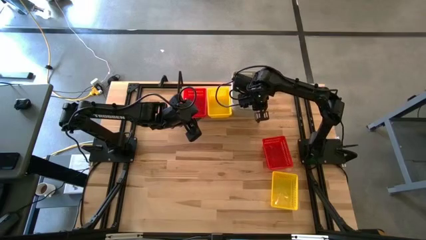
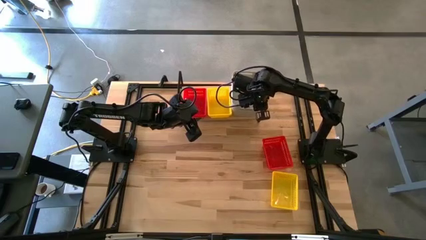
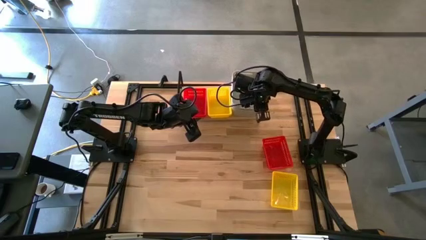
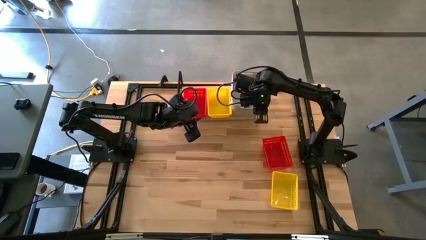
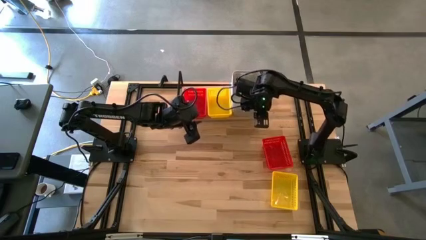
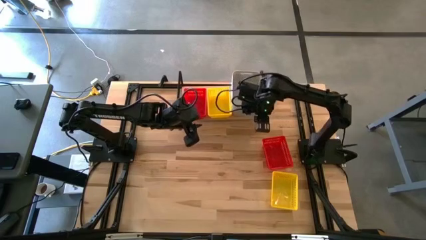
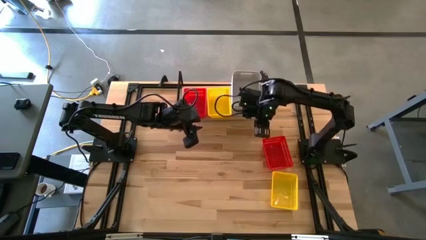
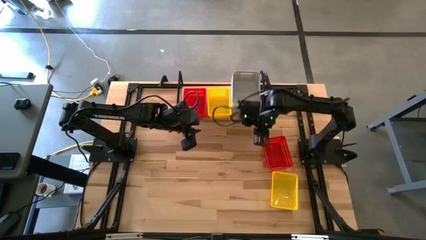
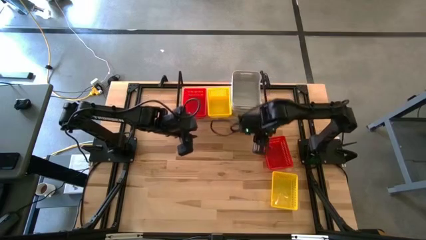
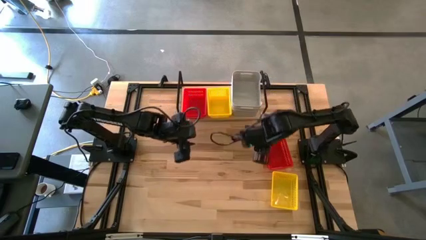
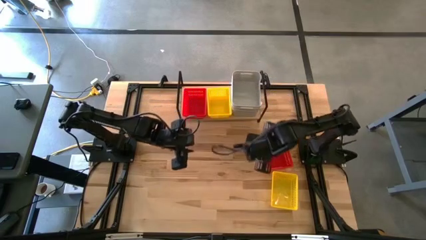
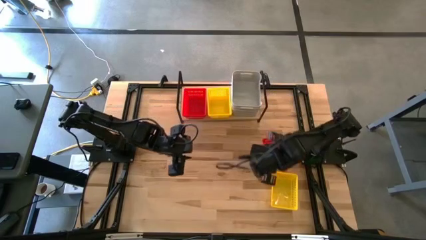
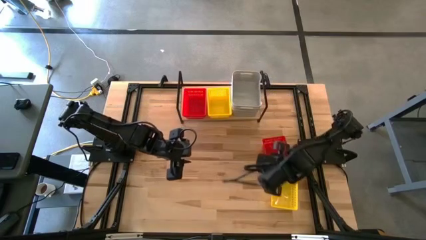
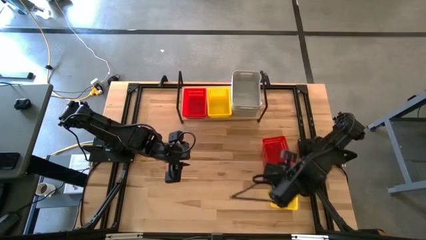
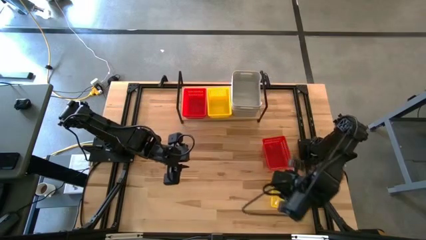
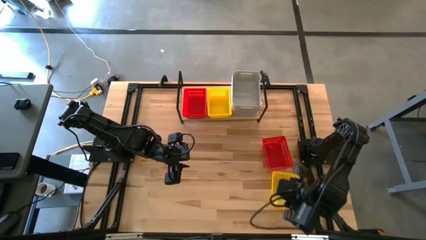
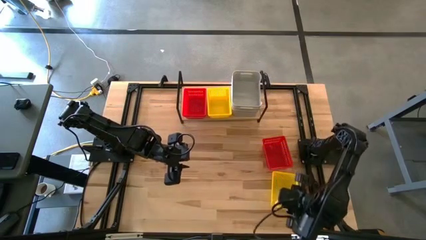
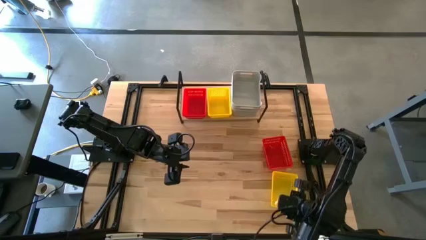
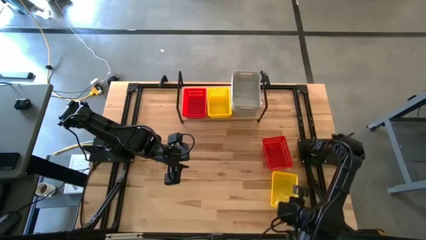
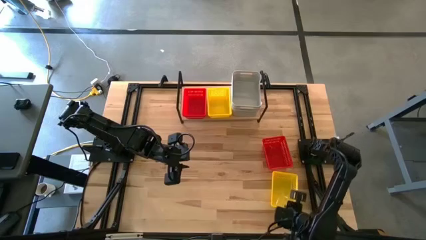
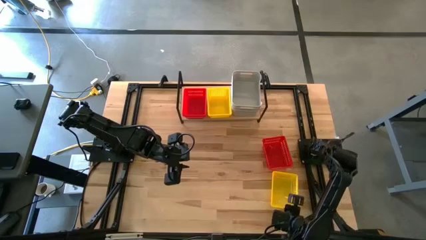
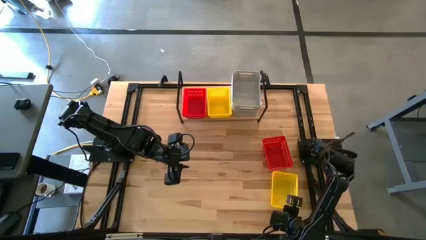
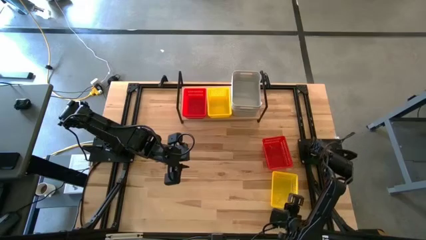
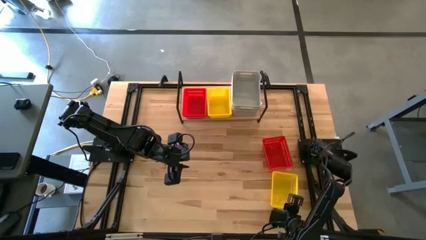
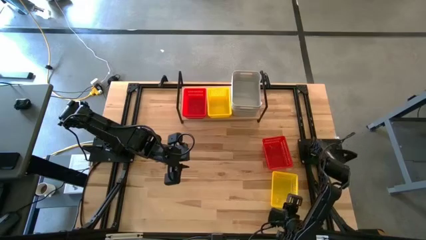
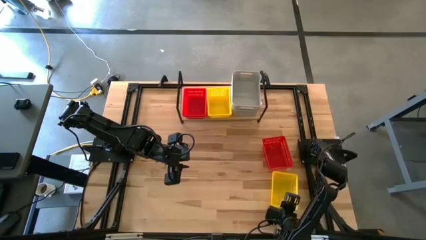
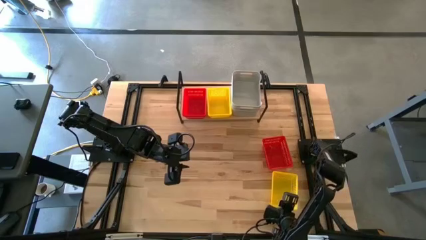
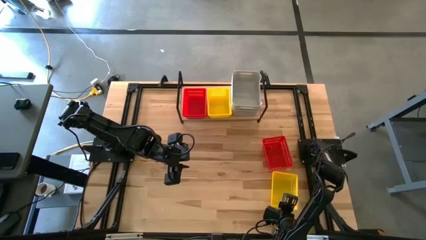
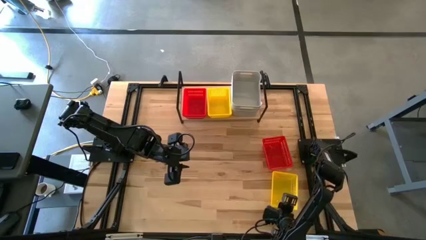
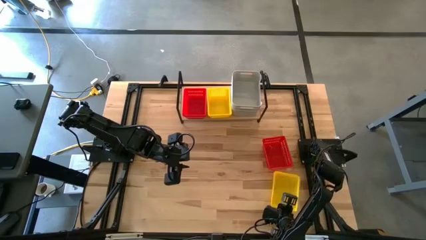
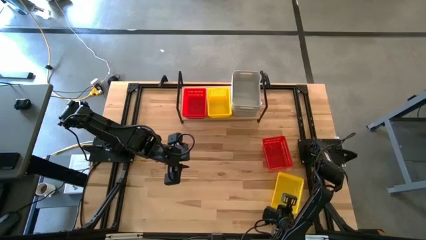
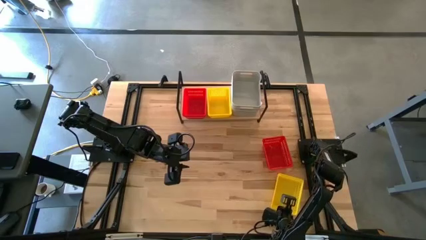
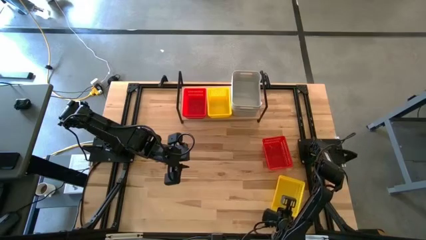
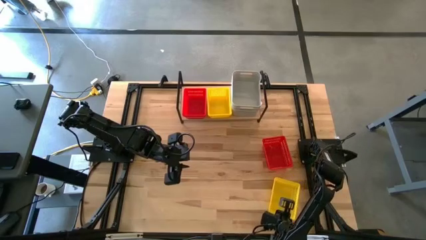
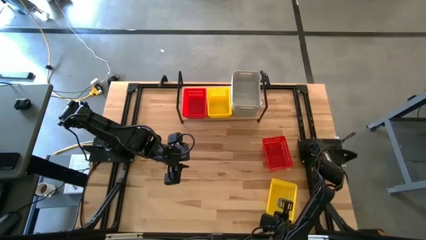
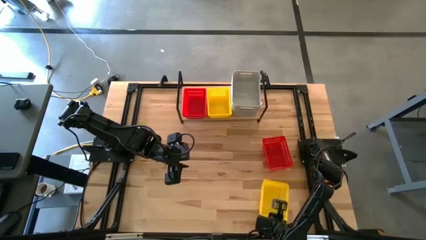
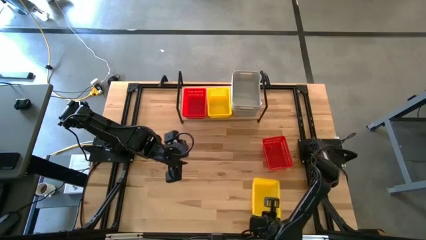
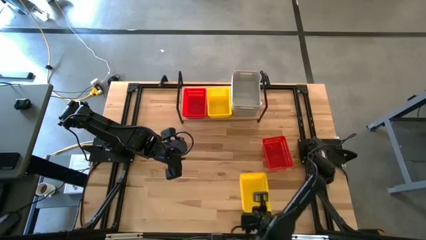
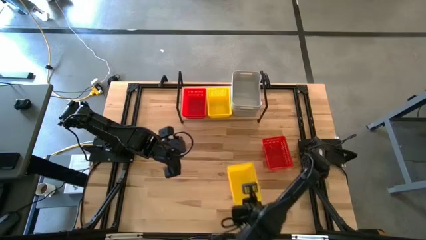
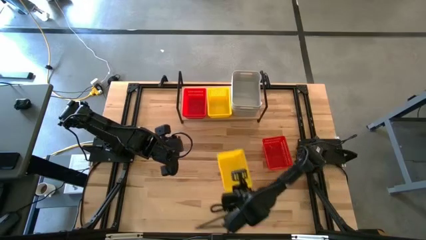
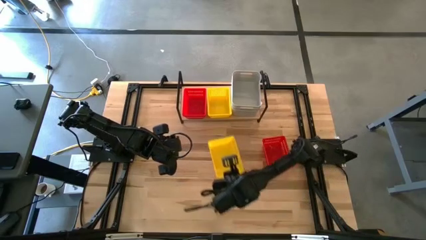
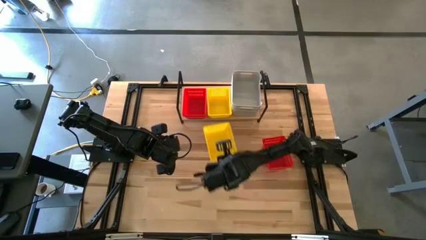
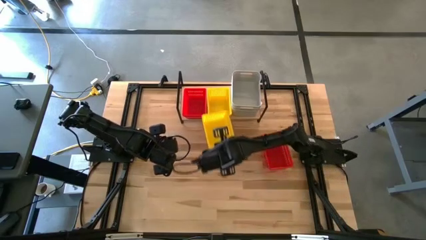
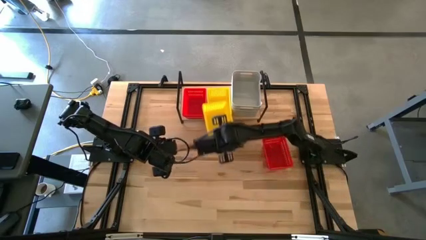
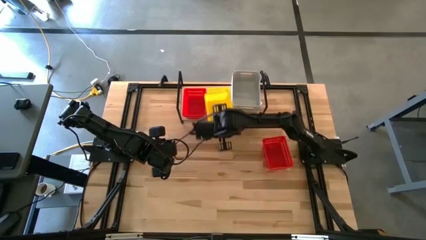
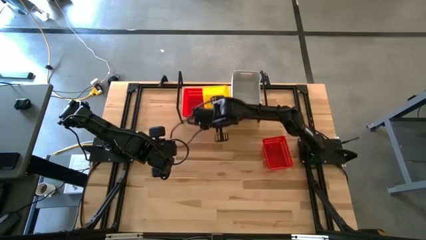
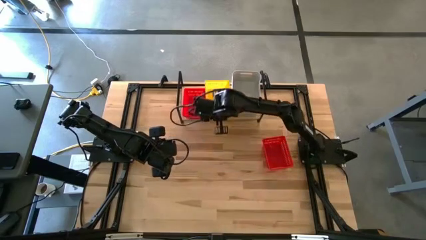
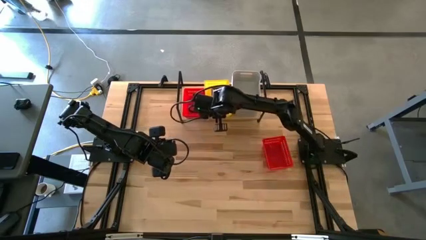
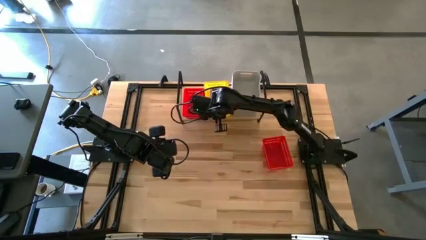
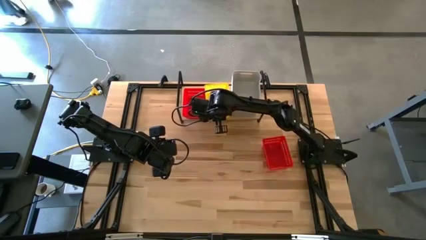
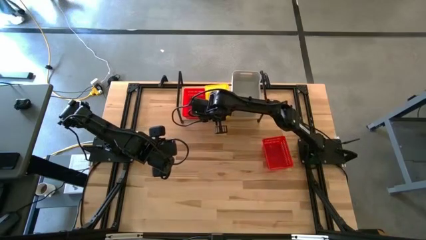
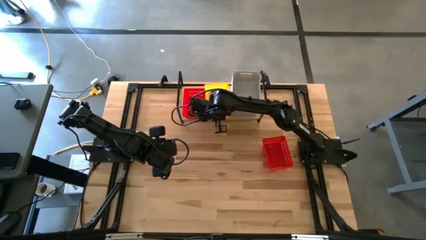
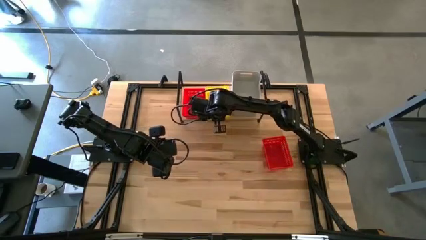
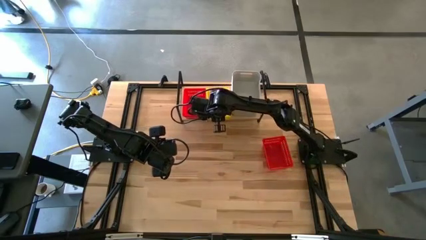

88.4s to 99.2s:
Task: Stack baskets on shelf by color
Stack the yellow bin on the yellow bins on the shelf

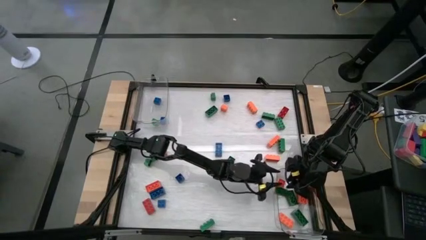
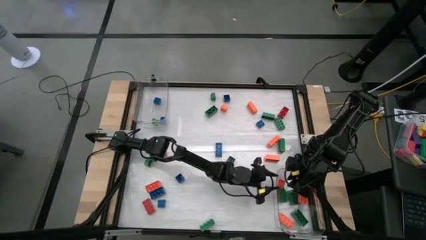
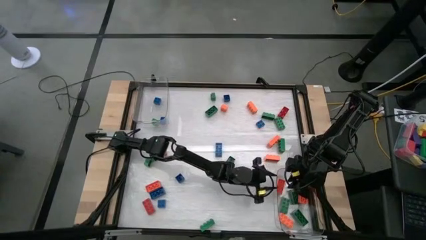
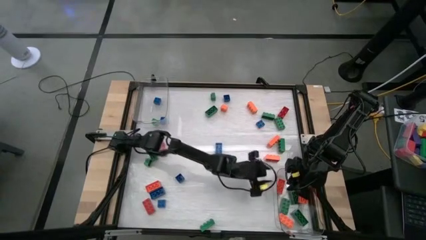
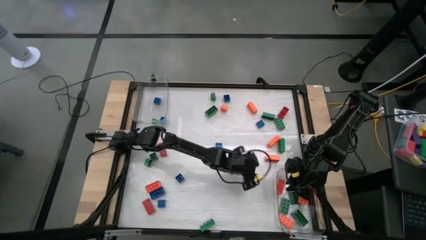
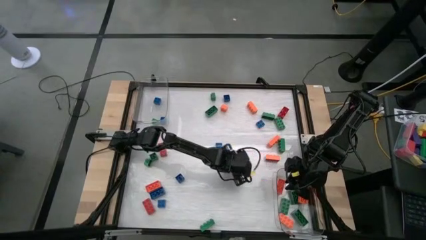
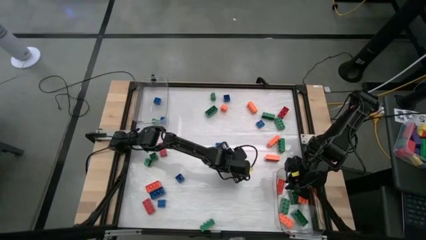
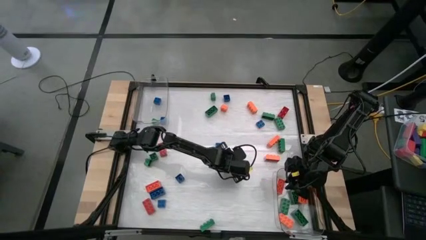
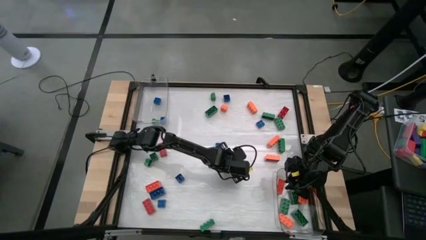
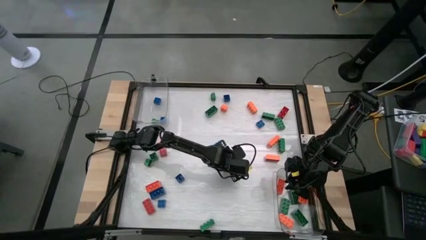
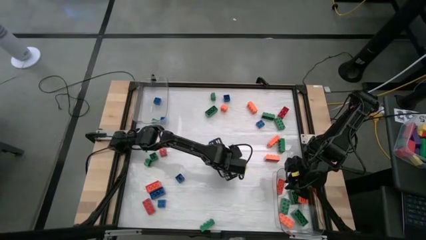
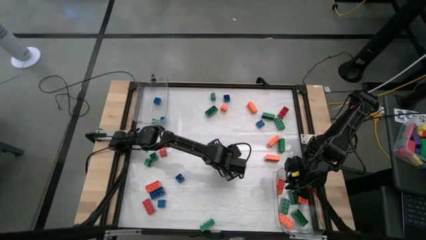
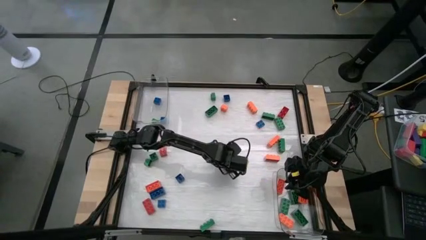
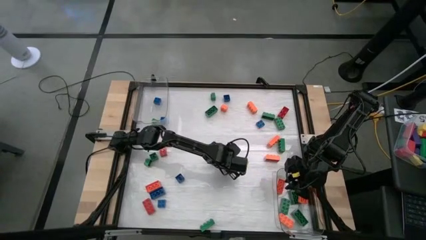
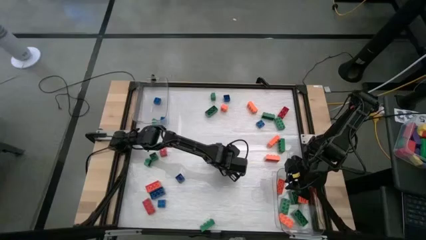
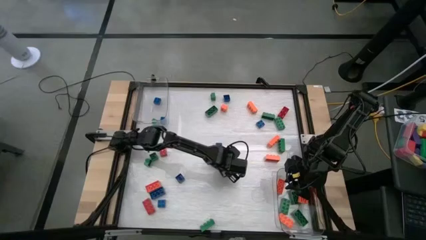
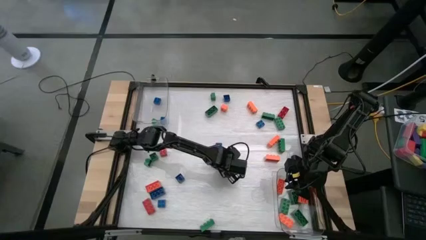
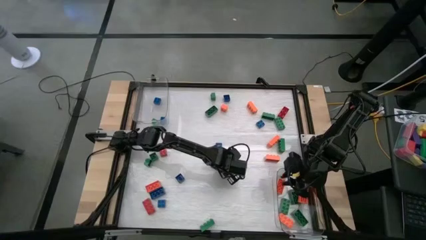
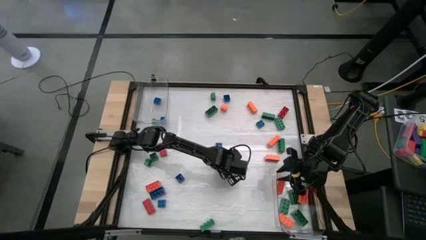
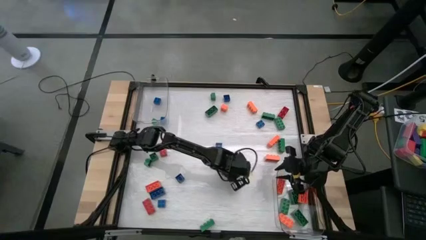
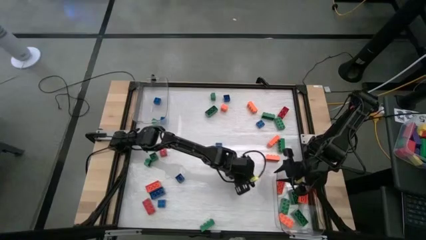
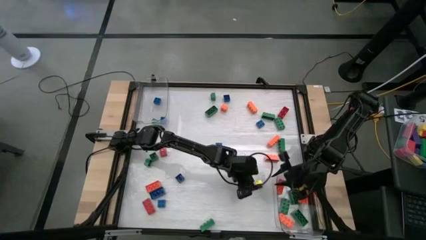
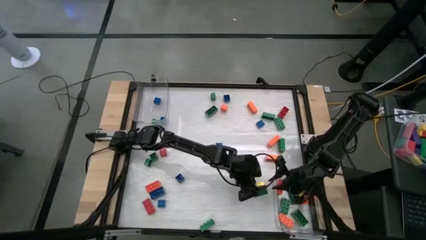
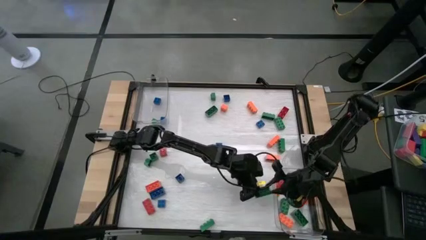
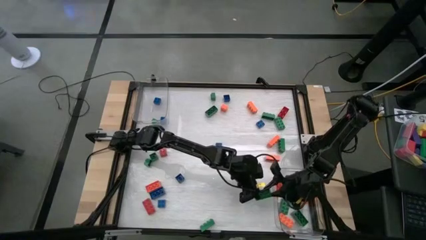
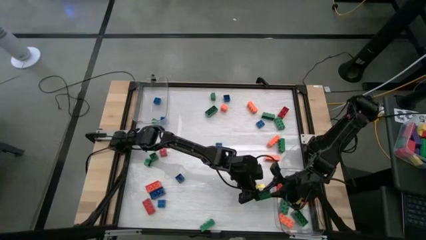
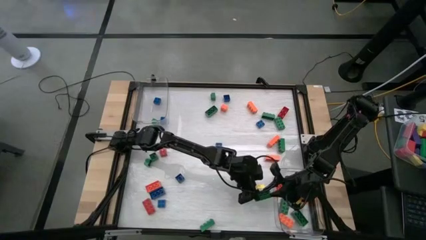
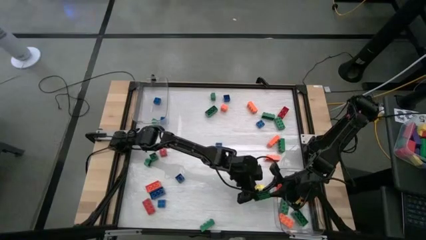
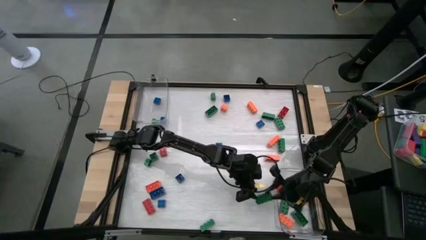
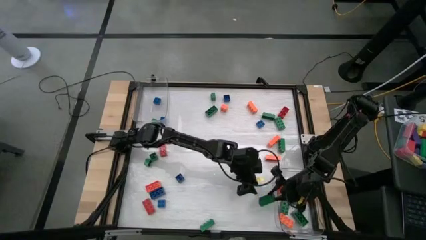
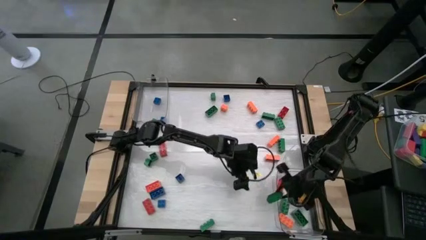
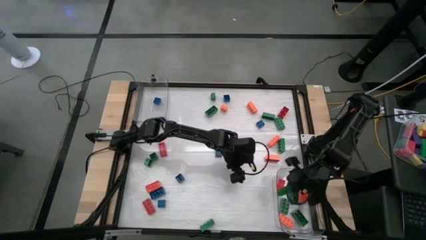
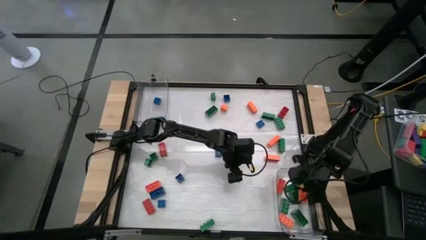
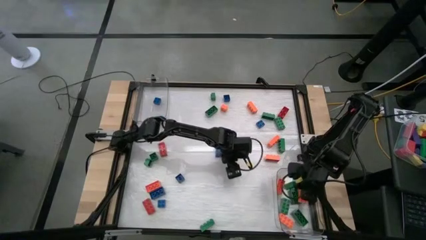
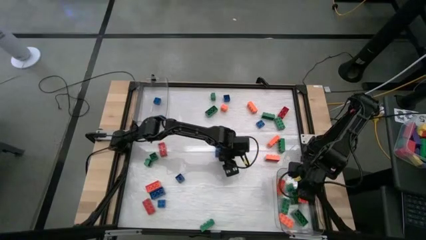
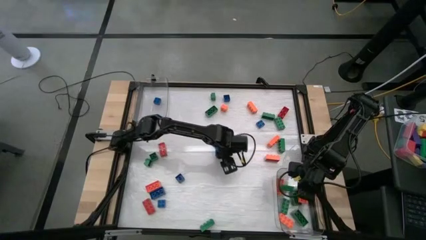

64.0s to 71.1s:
Task: Sort blocks by size
Put the 8 stud green game piece into the bottom transparent bin
